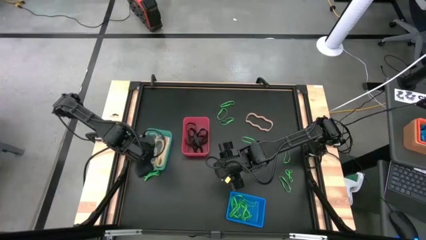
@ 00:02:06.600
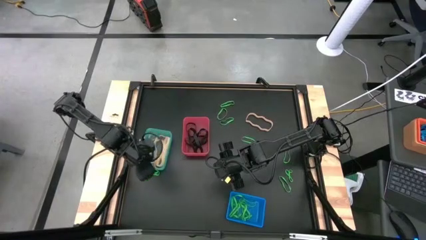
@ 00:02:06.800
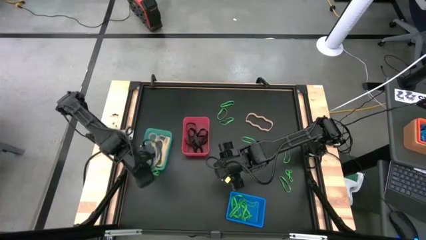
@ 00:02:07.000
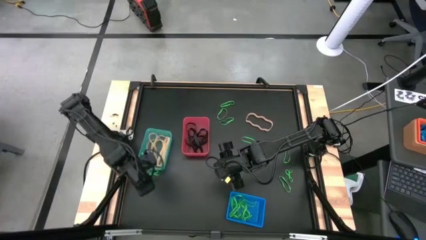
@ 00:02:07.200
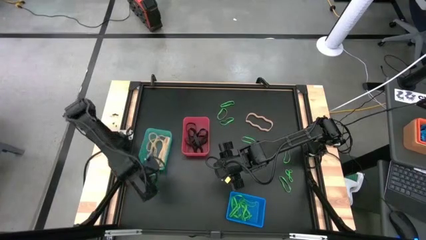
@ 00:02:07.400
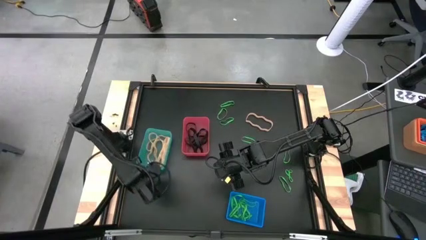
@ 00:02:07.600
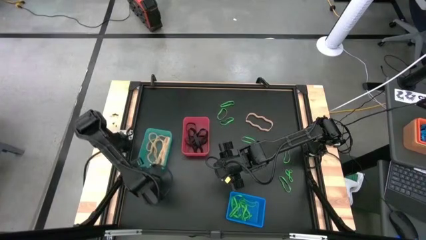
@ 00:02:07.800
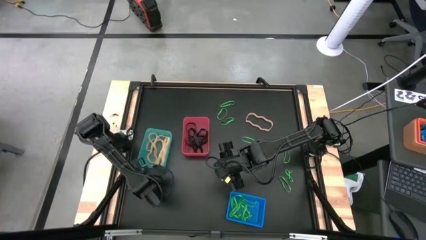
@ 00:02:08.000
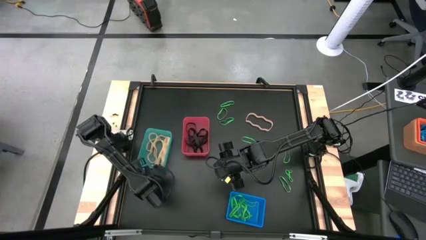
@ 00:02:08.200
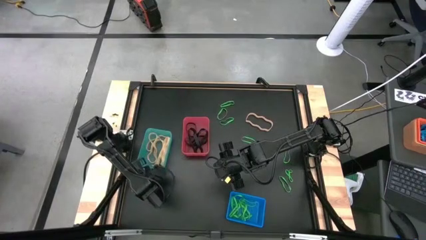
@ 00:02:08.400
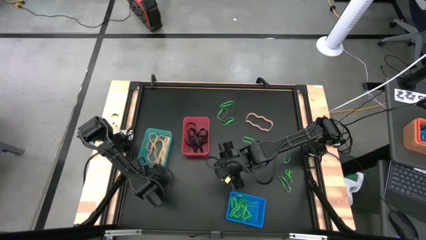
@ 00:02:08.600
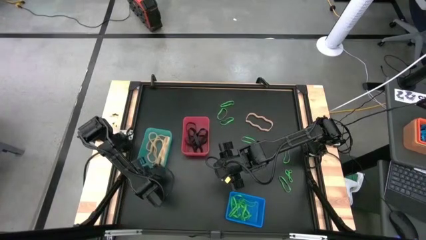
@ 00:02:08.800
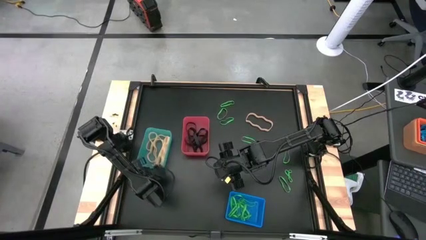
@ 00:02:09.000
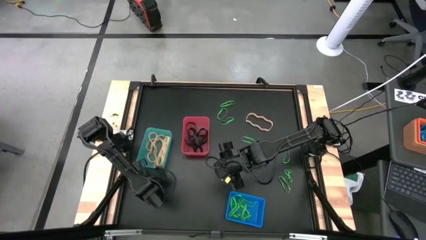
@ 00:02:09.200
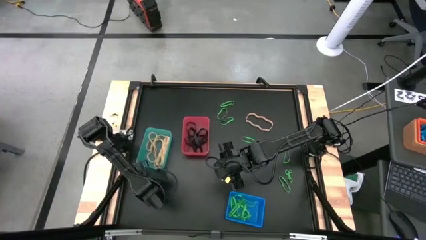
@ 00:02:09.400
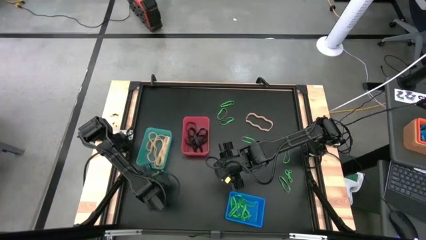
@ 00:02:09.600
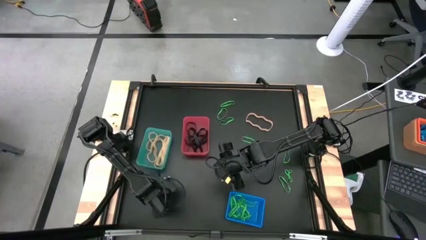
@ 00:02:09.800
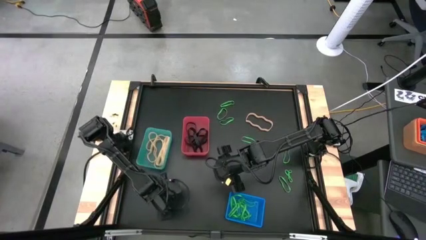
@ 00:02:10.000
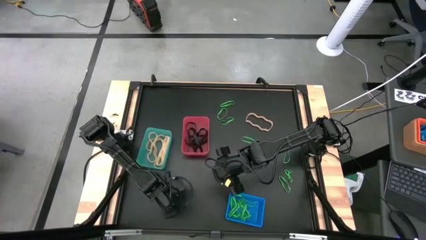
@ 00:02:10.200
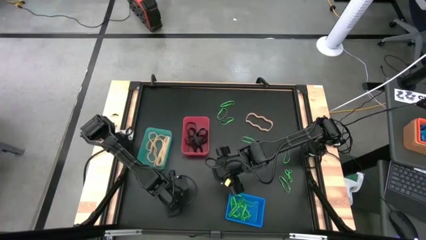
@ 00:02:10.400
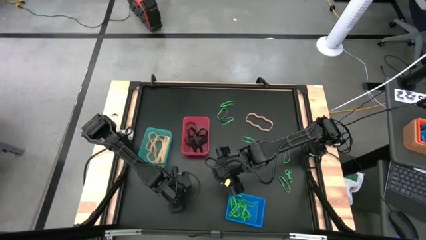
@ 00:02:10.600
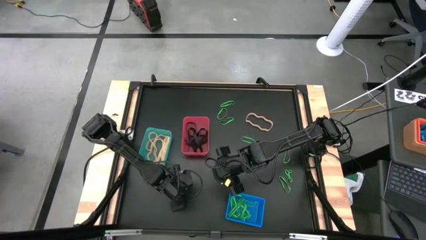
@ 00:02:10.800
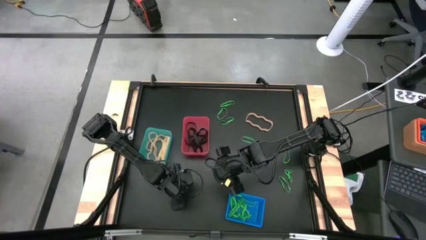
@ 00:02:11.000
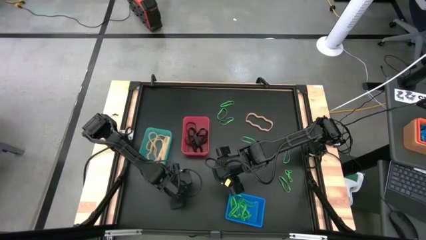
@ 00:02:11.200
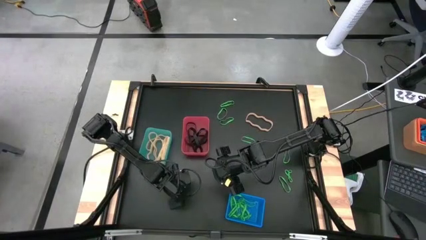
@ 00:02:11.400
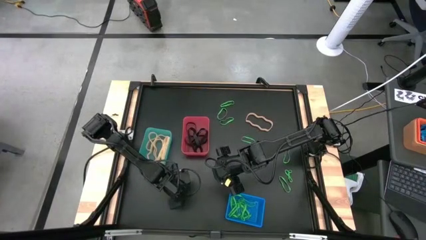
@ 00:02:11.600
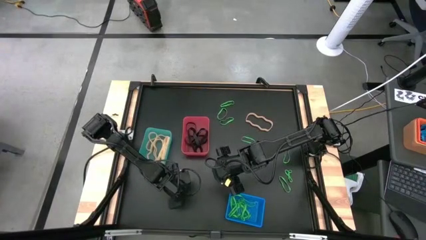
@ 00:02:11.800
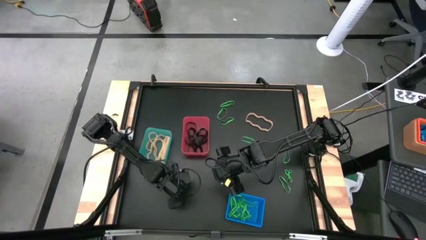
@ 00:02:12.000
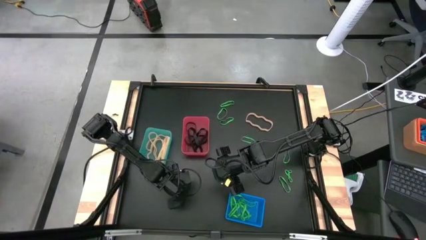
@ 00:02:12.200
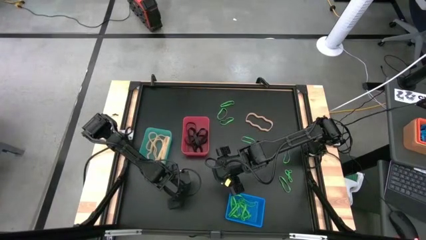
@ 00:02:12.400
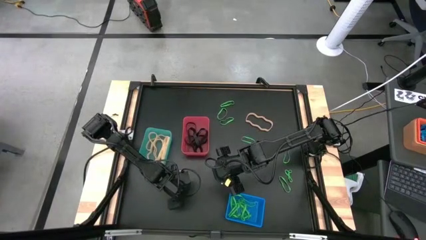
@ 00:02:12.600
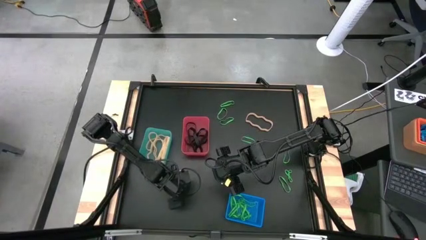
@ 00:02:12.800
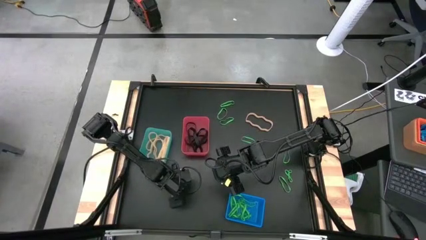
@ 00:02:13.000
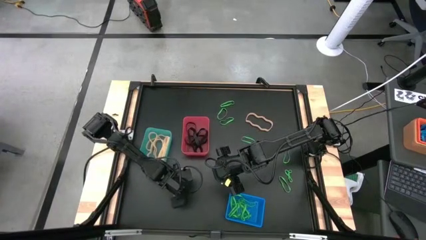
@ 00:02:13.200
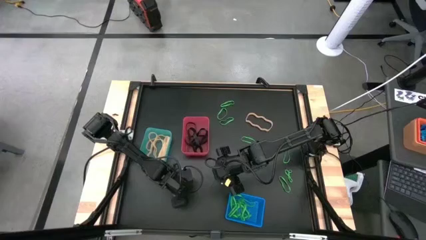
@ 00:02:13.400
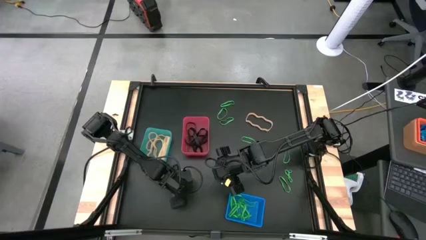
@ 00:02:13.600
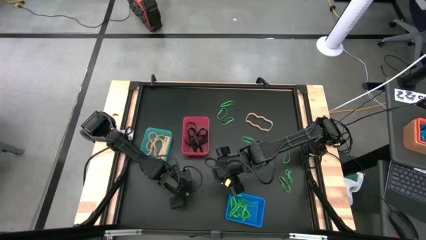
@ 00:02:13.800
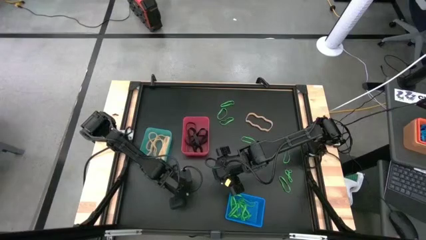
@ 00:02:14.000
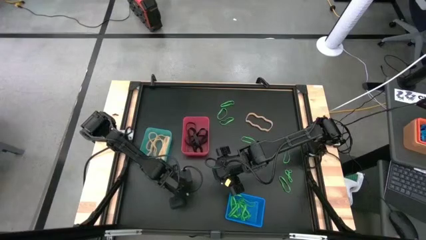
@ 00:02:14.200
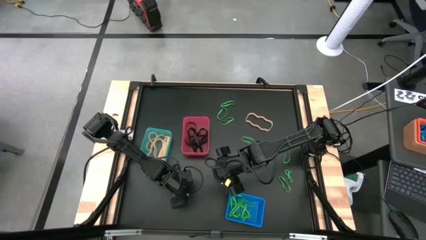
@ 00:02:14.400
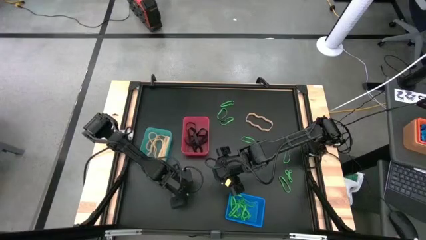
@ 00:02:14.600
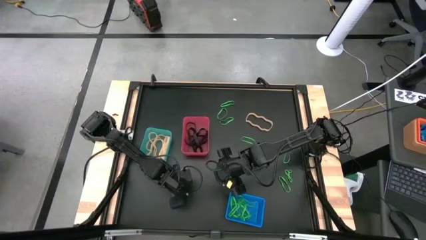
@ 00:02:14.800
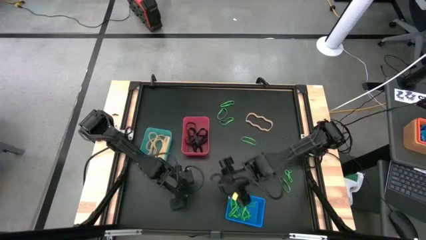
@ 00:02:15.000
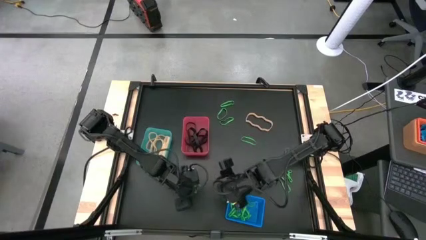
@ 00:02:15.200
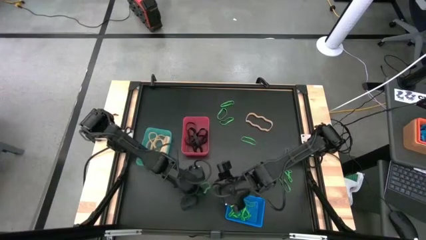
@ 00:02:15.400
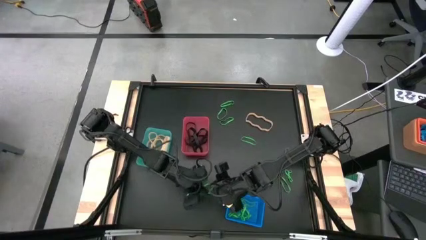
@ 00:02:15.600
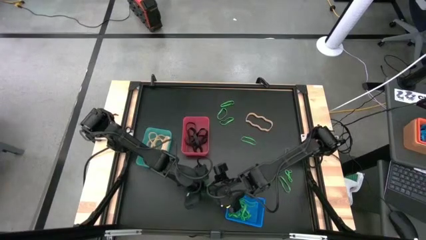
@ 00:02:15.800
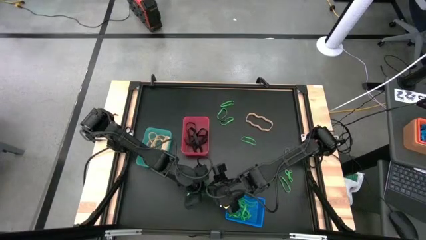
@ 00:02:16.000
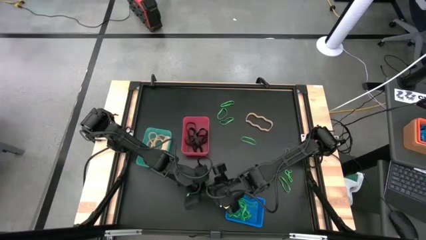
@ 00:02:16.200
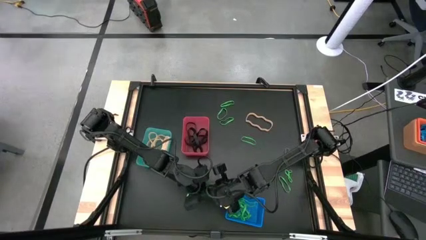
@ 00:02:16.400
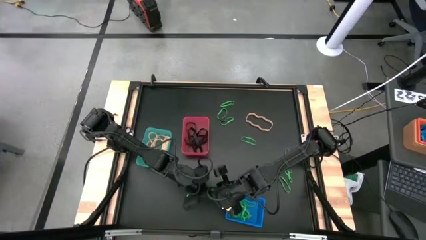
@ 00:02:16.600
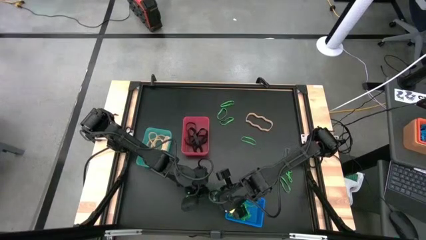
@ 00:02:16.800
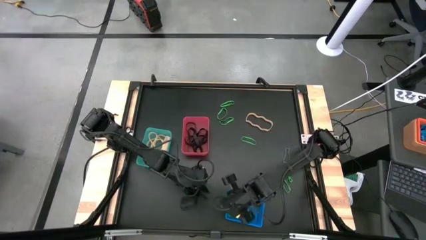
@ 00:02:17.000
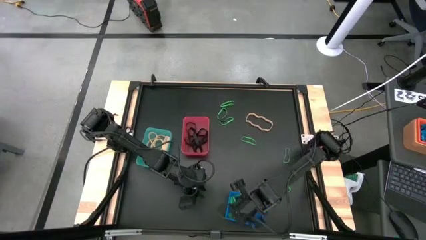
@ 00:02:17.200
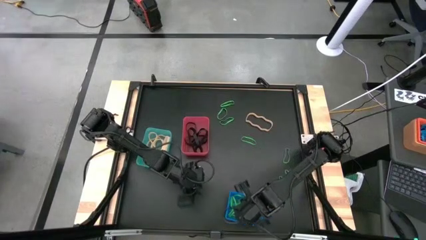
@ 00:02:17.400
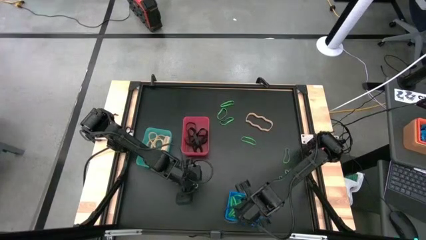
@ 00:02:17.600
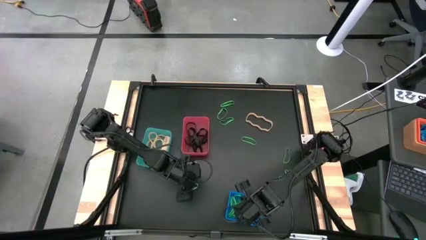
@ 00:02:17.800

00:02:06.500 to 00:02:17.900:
Task: Sort rubber bands into baskets
Put the green rubber band into the blue bin

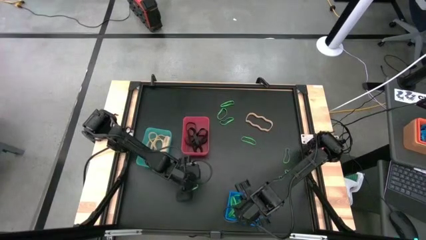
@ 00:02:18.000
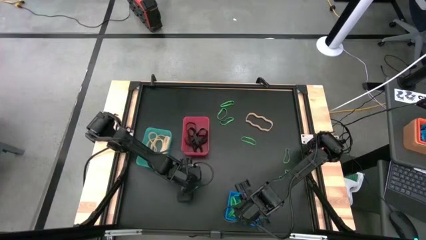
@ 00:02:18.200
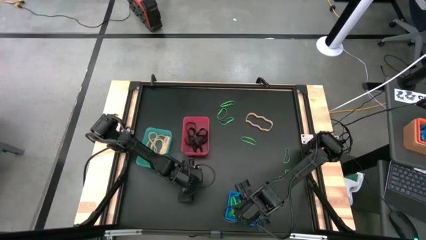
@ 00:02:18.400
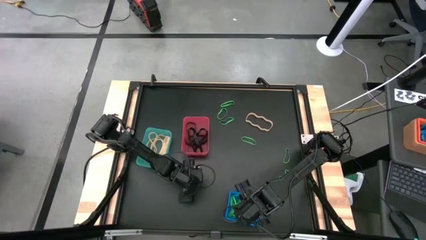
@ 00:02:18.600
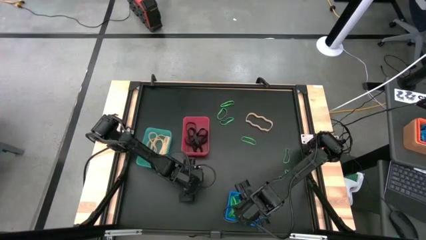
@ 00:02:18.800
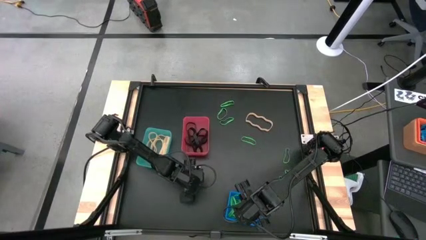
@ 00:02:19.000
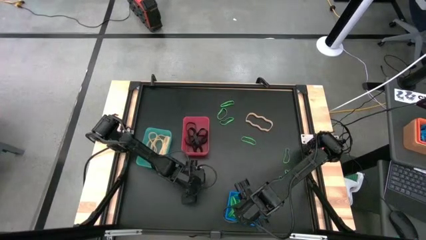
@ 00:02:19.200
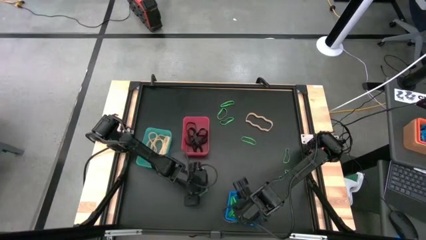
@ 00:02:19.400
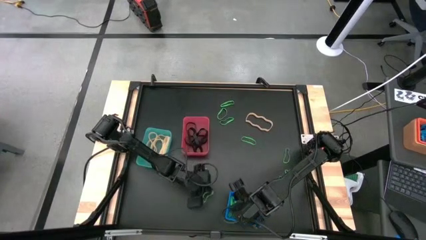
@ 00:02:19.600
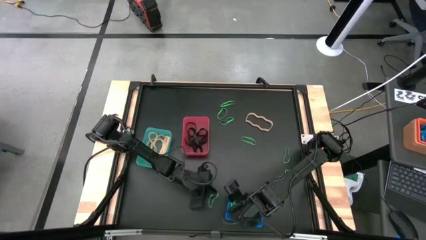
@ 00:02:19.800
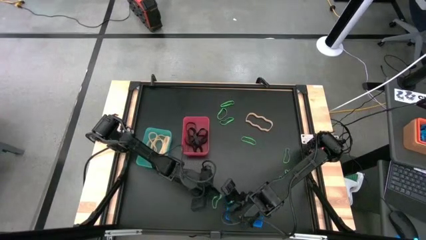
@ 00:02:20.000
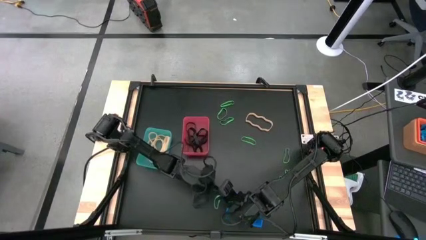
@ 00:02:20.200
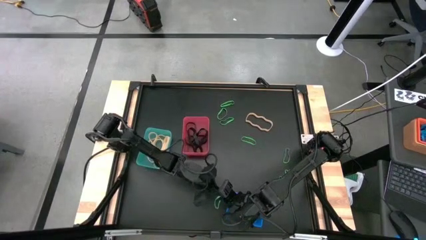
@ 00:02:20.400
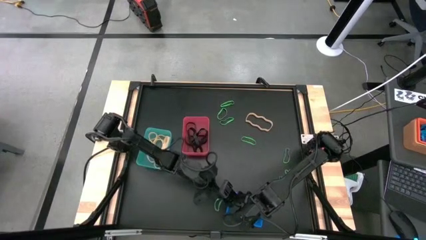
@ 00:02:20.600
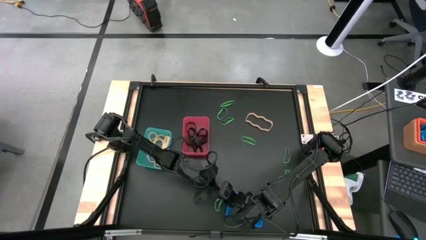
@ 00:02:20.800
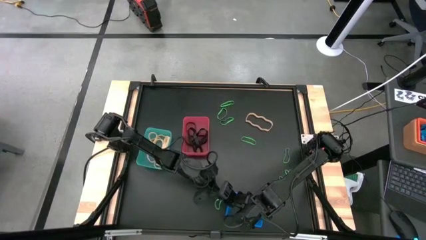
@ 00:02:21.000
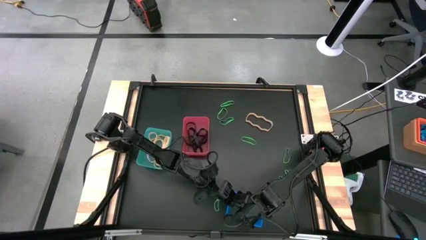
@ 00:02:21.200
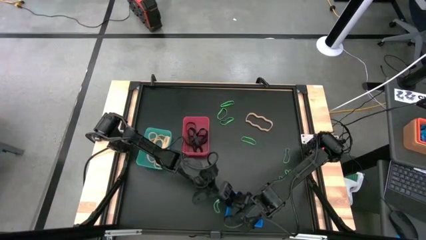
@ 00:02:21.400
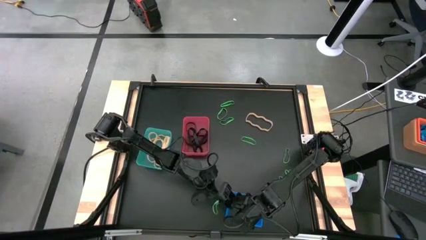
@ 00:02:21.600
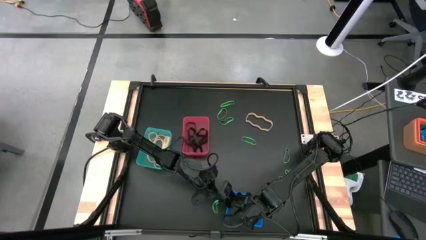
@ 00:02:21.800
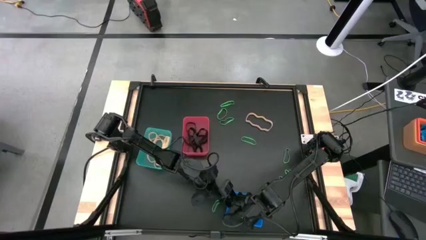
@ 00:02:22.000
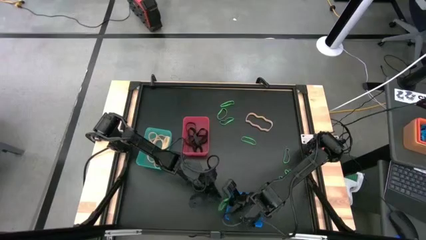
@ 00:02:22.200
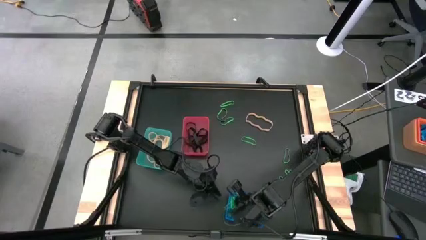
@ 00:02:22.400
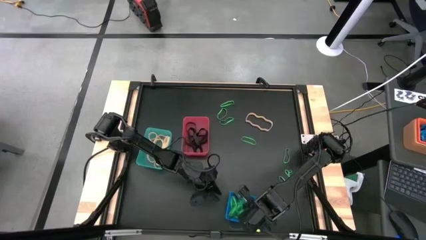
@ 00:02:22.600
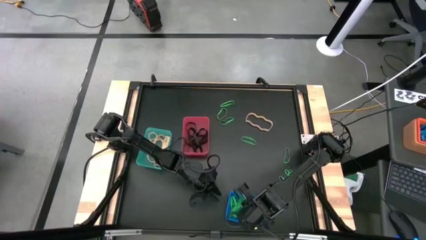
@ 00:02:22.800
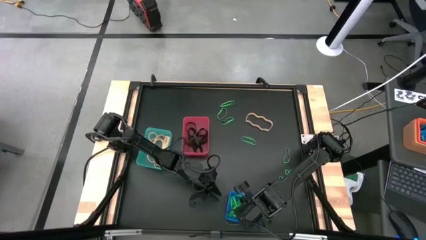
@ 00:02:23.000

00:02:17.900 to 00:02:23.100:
Put the green rubber band into the blue bin
